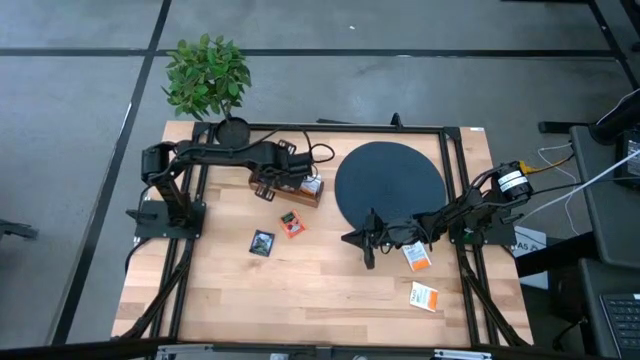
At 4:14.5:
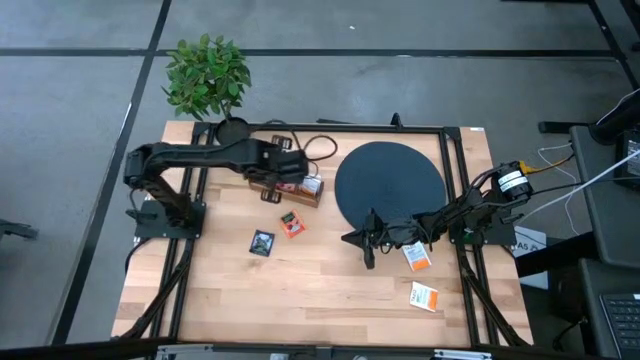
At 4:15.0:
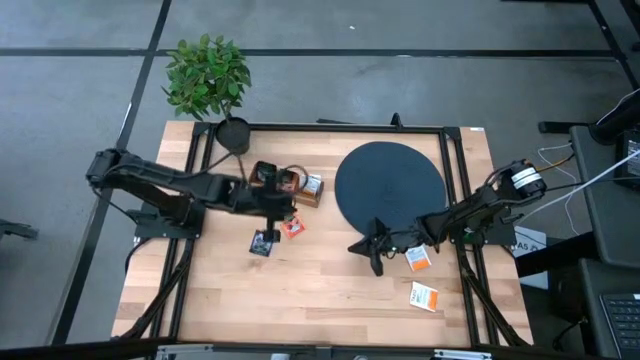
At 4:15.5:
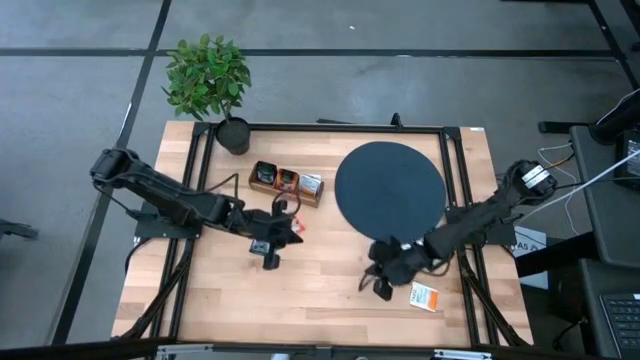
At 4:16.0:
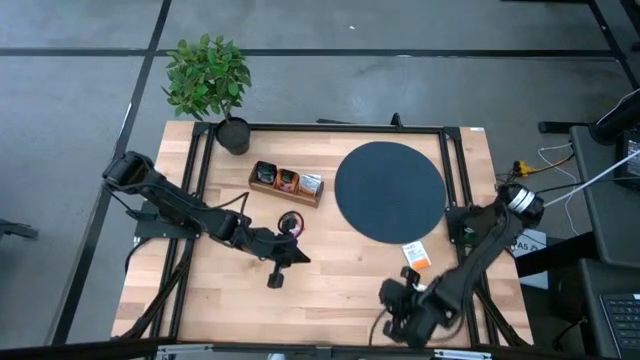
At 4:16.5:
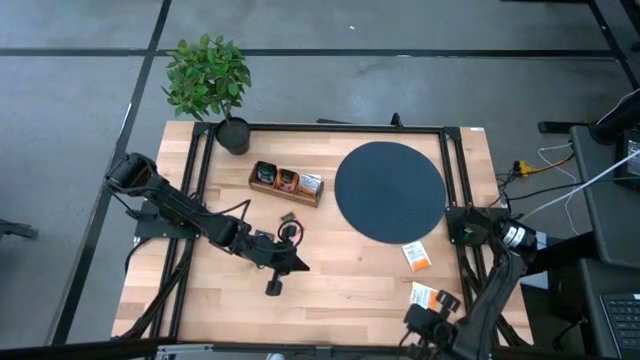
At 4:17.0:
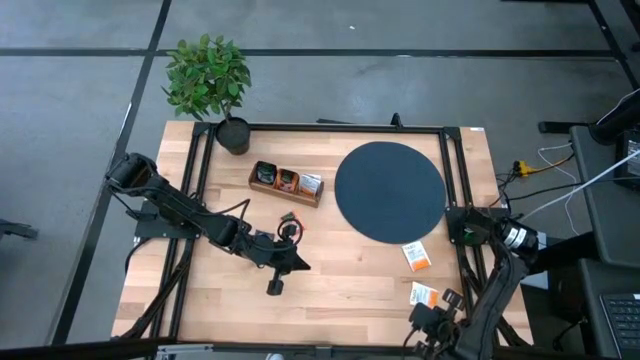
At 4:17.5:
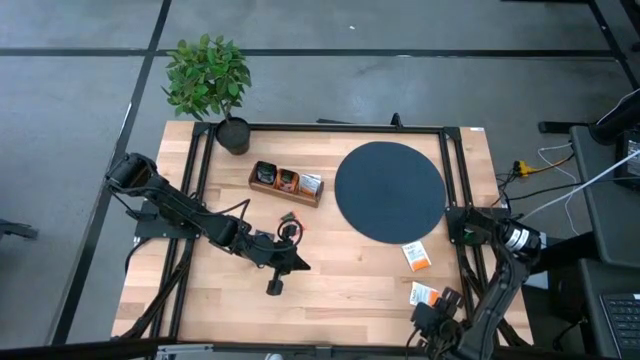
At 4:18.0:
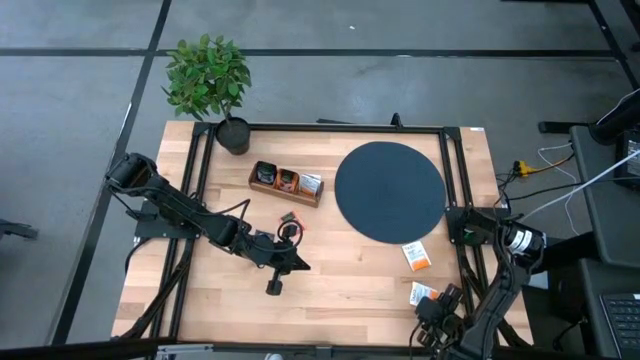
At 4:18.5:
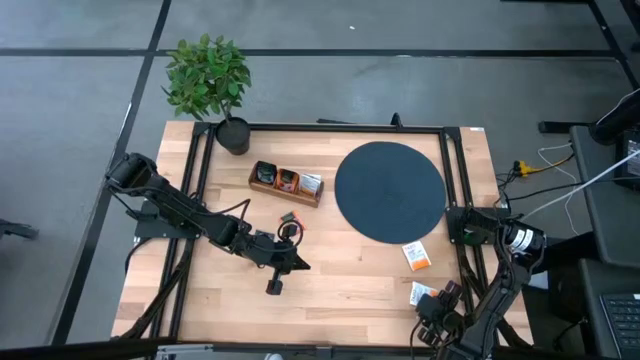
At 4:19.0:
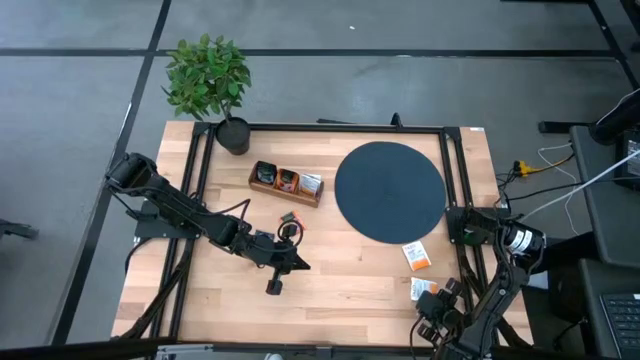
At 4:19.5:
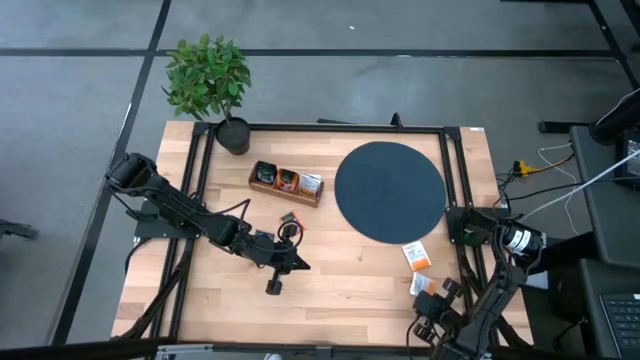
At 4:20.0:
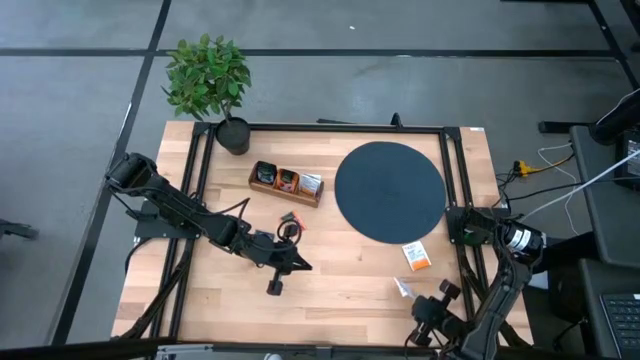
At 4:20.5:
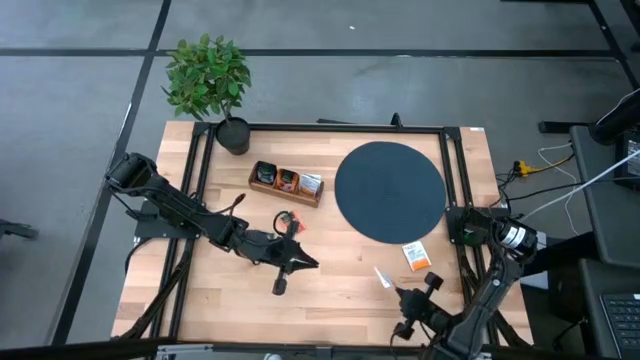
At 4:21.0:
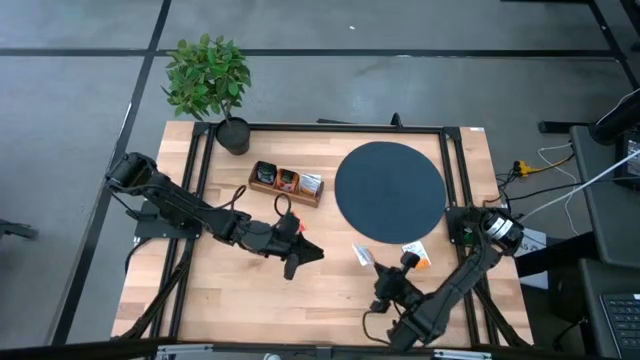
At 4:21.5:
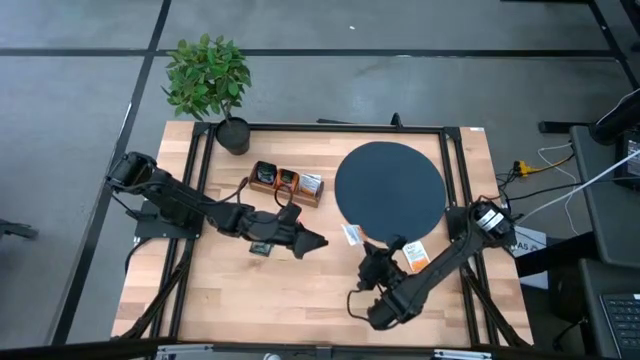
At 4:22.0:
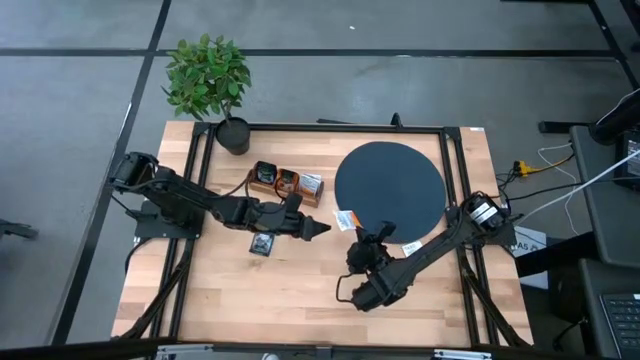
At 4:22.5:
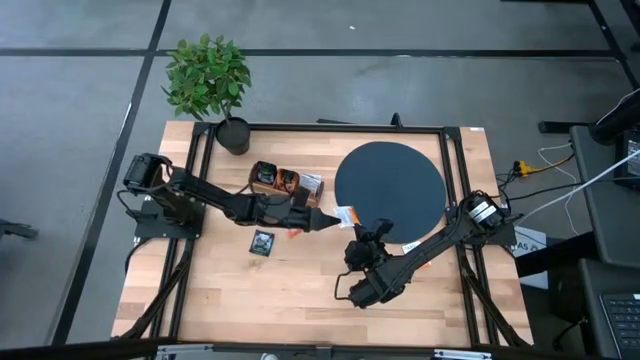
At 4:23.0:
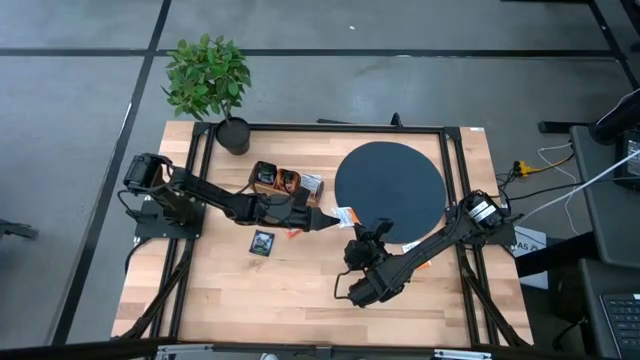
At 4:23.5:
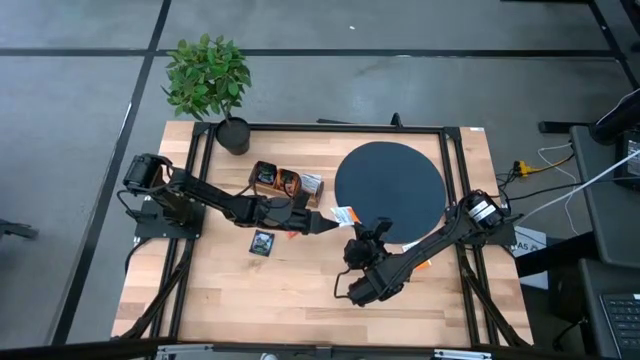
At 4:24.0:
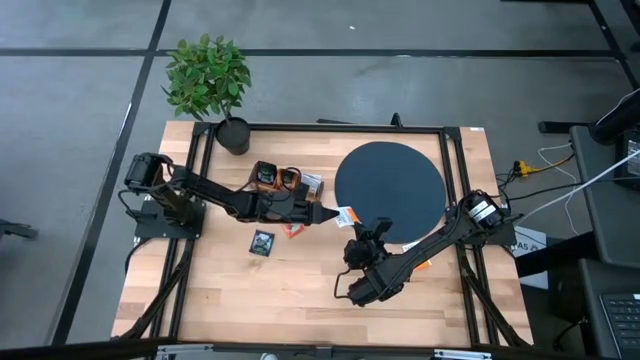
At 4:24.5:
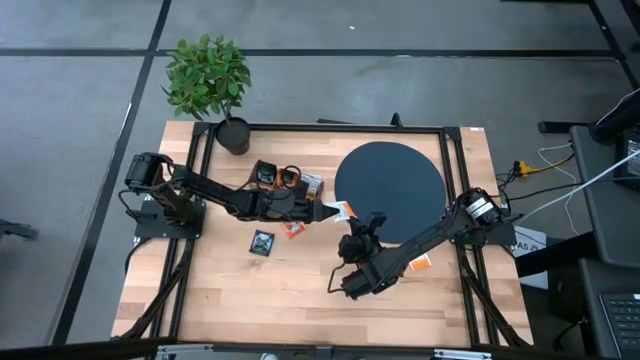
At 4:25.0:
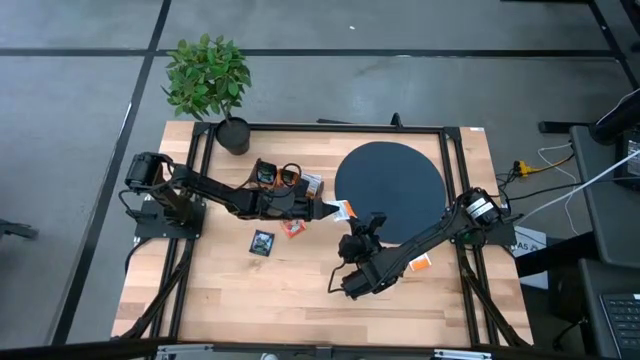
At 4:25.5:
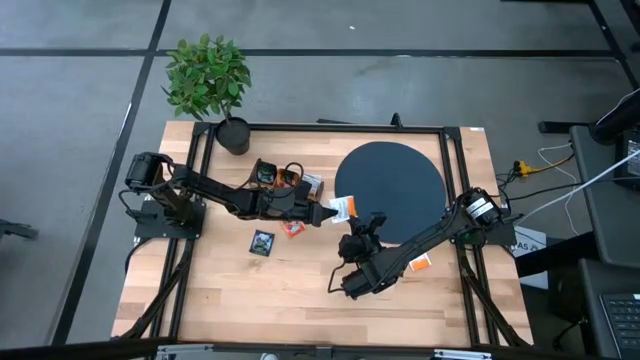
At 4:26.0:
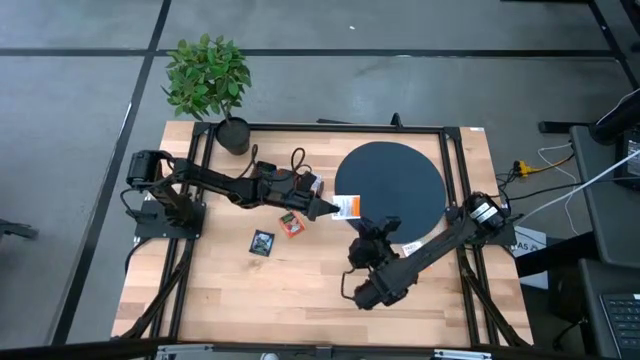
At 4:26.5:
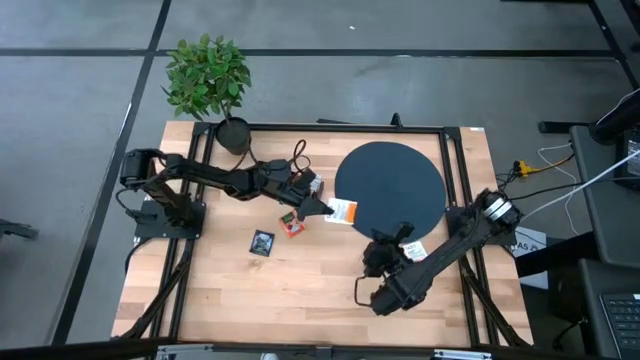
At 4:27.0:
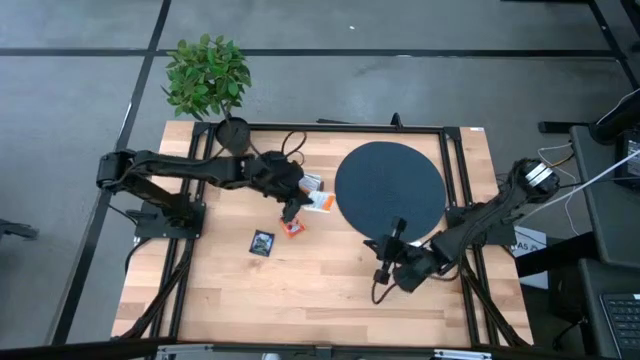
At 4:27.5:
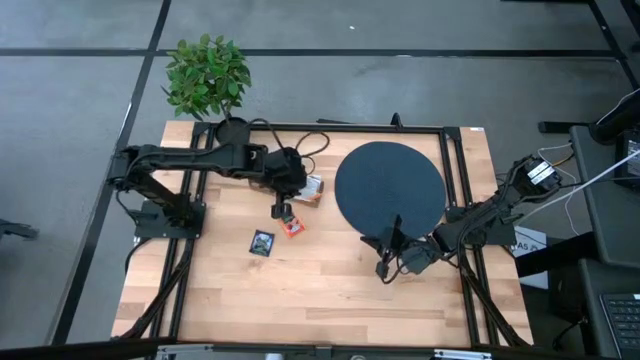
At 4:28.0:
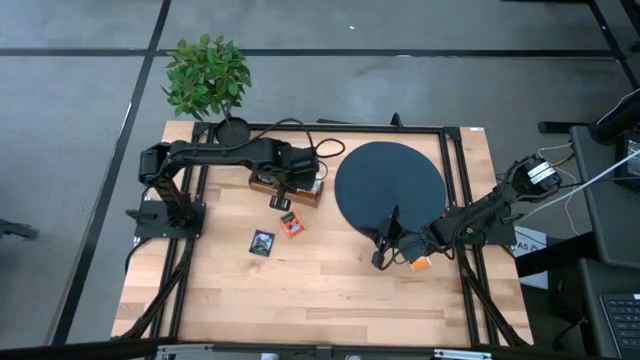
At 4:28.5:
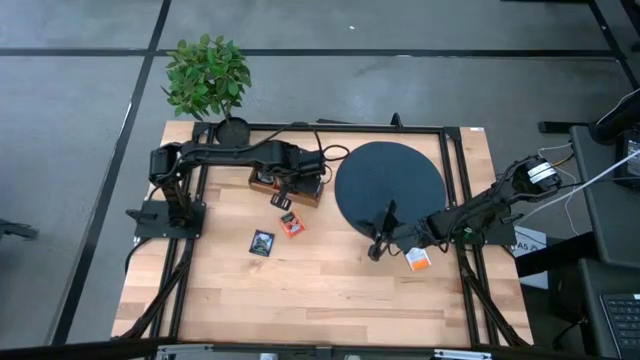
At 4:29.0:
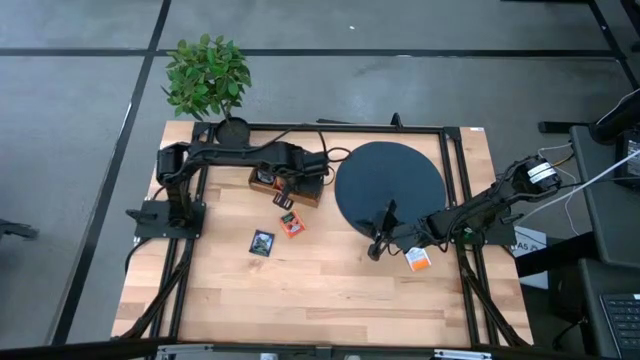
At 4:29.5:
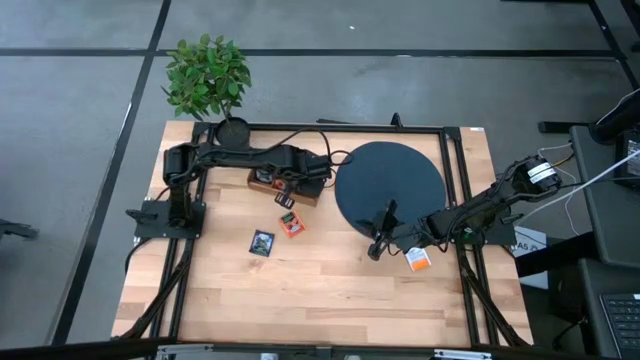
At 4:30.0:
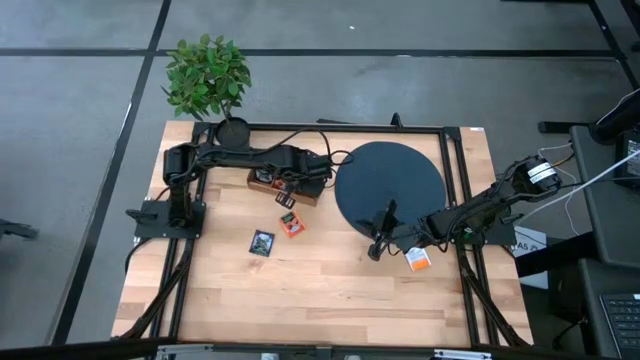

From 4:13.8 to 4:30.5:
Task: Pick & Place Tea
Put the bottom white tea bag into the right section of the wooden organizer

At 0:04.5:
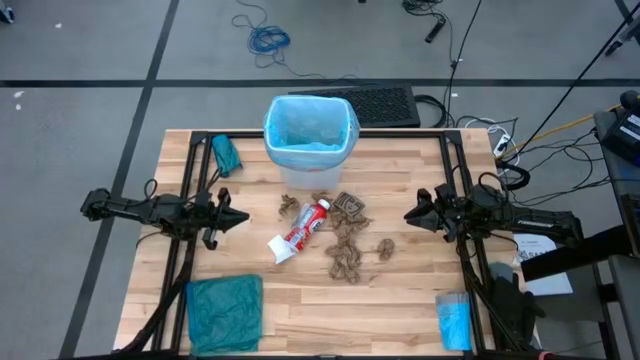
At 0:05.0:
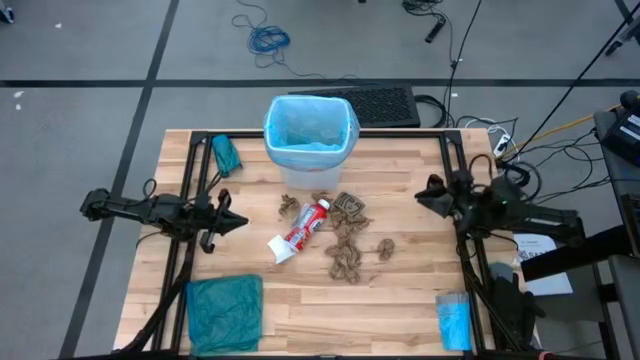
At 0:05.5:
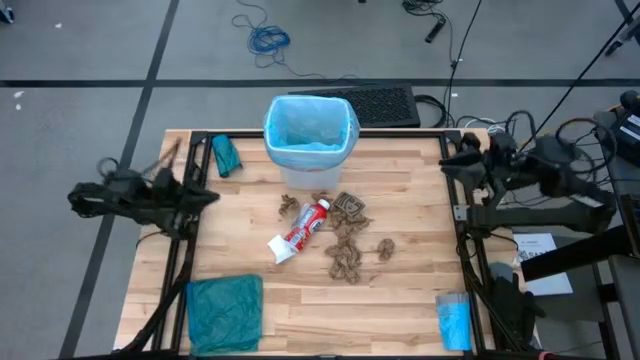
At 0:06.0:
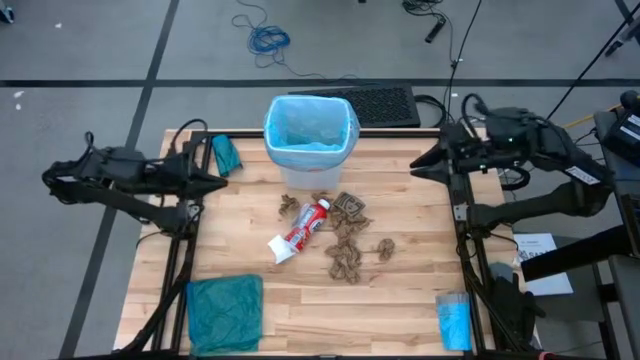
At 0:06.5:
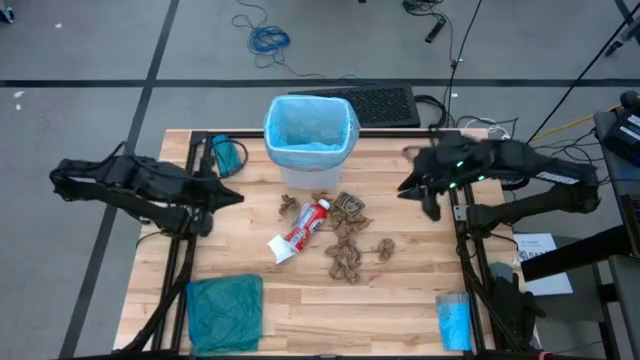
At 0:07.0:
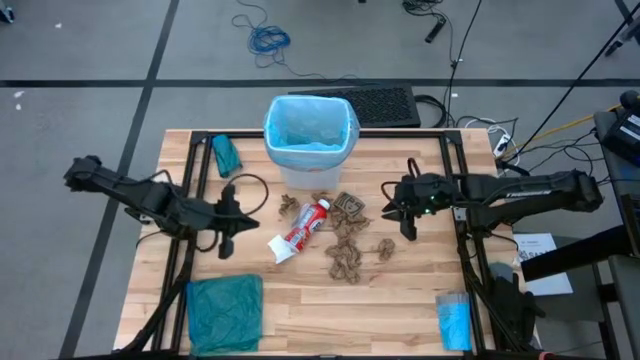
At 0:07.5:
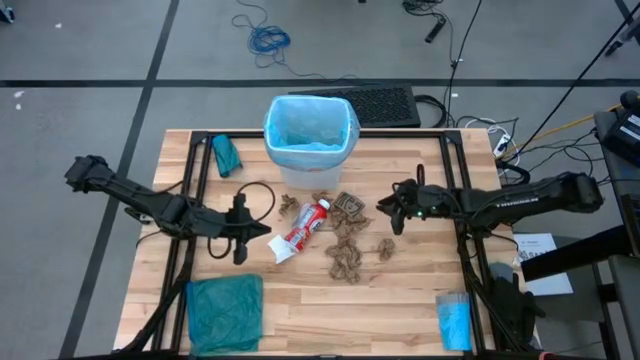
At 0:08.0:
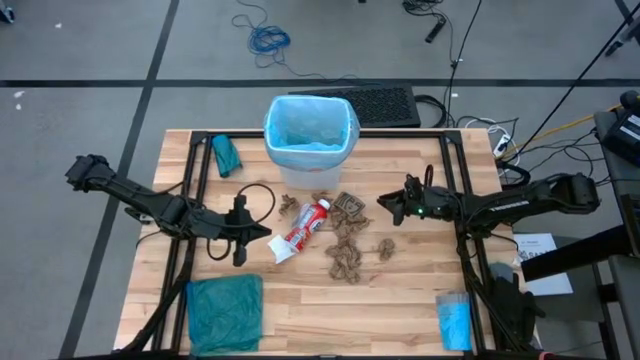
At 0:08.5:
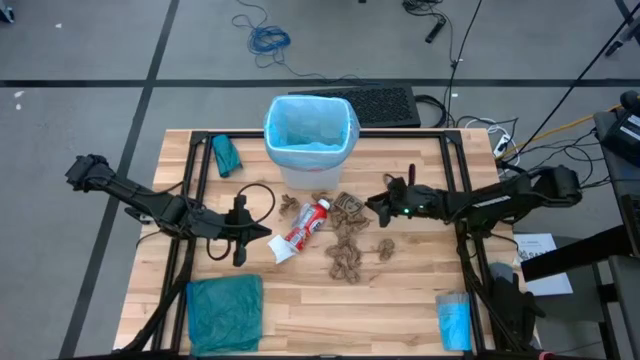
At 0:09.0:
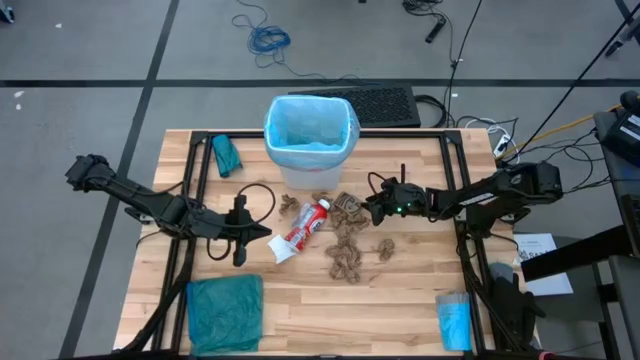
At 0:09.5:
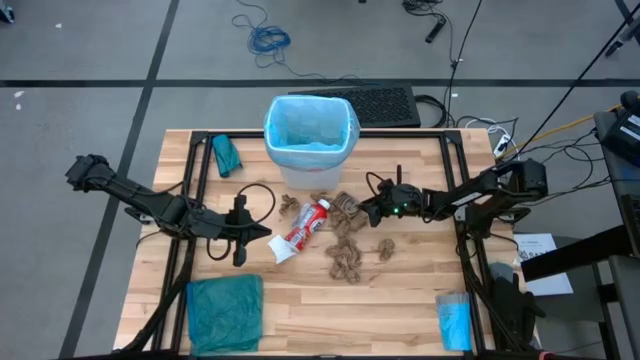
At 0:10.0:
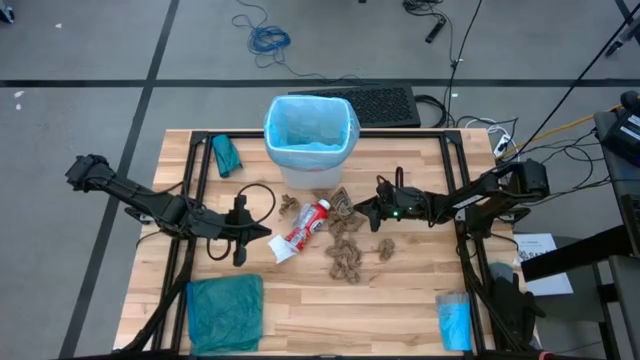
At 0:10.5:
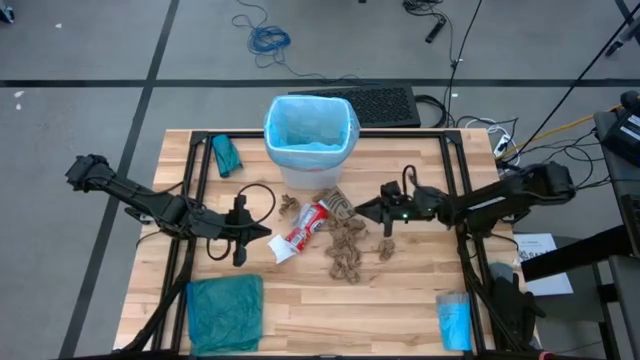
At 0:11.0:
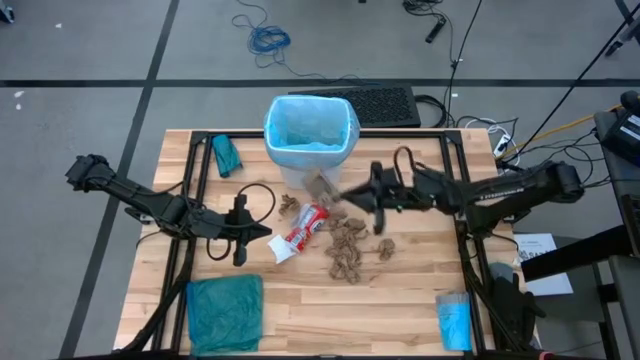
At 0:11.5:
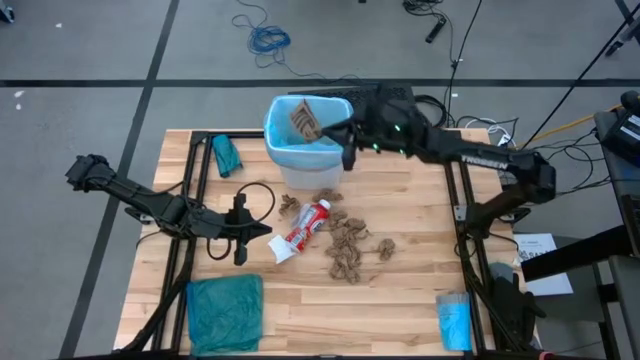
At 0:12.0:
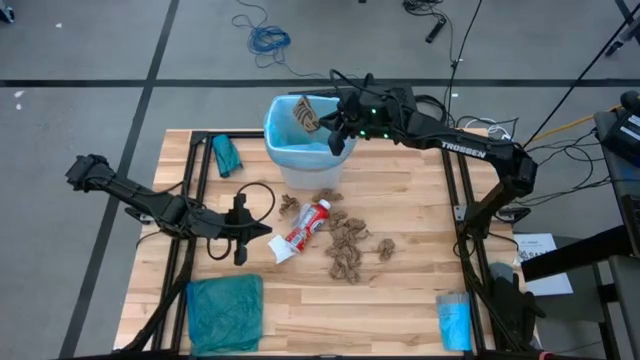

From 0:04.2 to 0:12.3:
Task: place trash/remove bag and relplace
Put the brown cardboard into the blue trash bag inside the white trash bin
